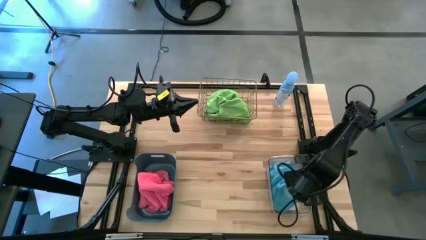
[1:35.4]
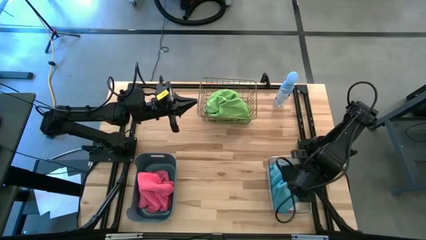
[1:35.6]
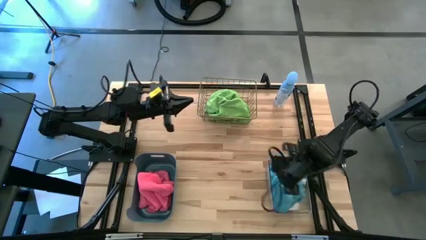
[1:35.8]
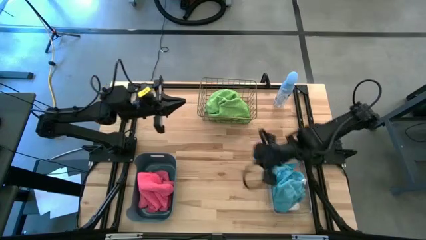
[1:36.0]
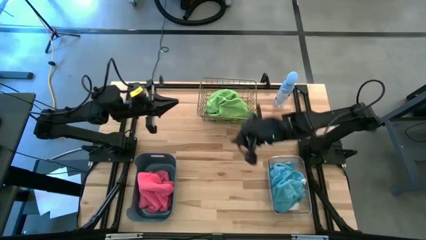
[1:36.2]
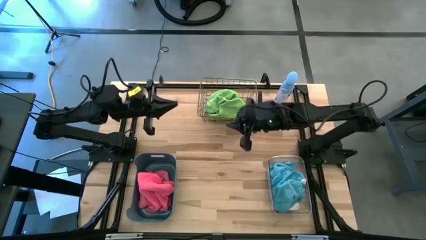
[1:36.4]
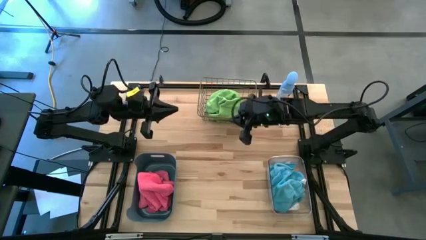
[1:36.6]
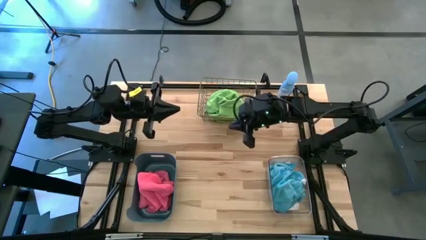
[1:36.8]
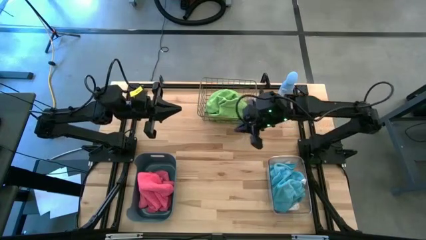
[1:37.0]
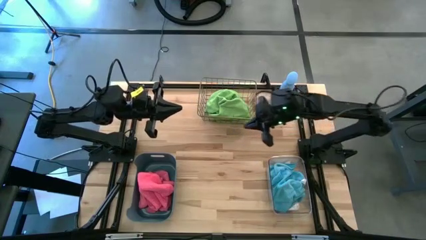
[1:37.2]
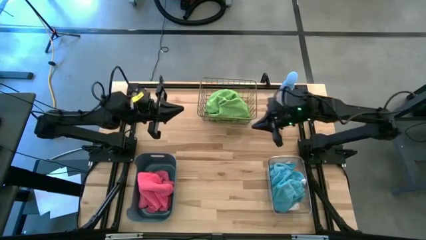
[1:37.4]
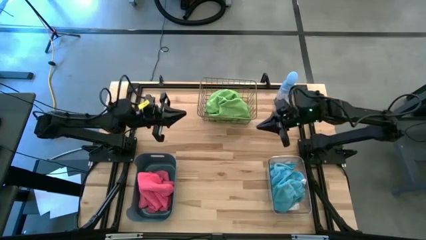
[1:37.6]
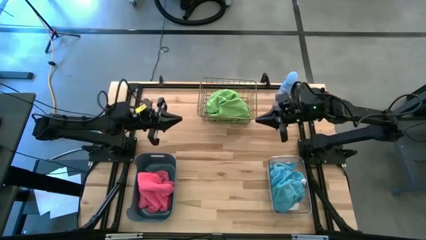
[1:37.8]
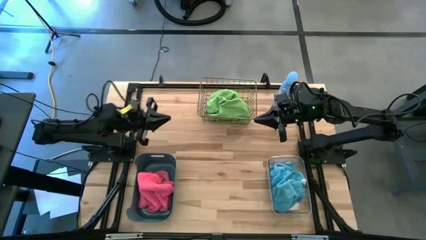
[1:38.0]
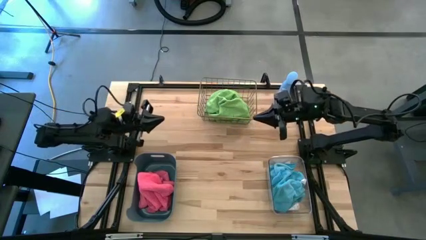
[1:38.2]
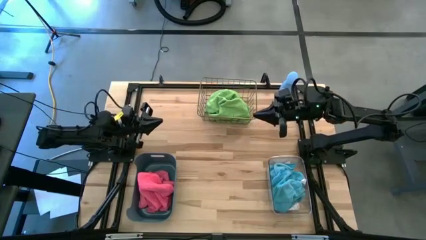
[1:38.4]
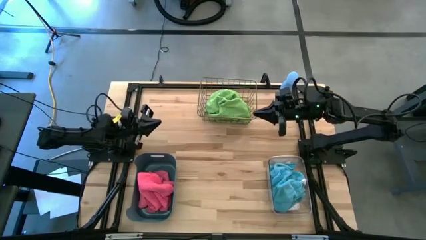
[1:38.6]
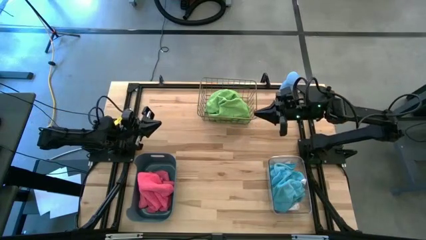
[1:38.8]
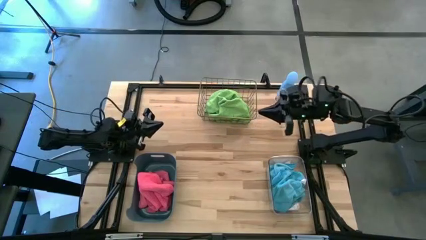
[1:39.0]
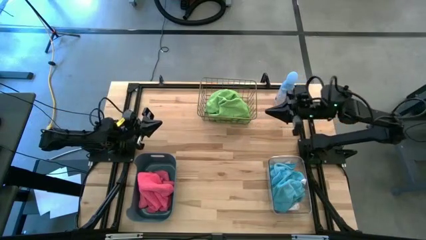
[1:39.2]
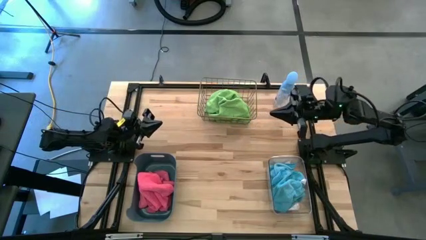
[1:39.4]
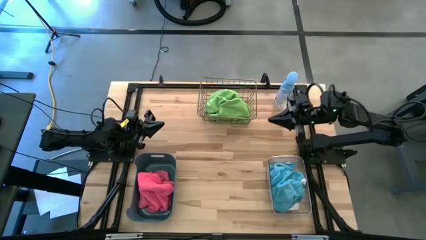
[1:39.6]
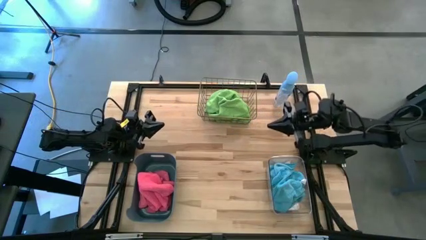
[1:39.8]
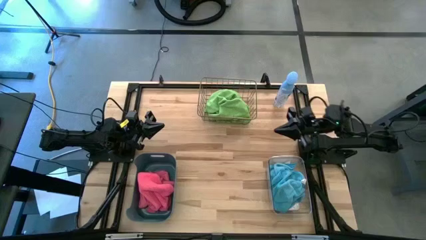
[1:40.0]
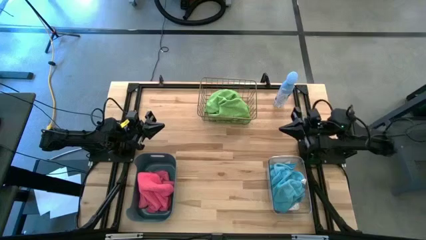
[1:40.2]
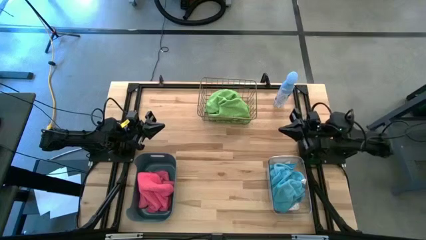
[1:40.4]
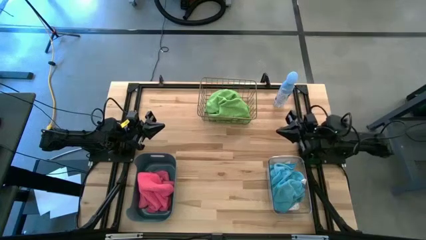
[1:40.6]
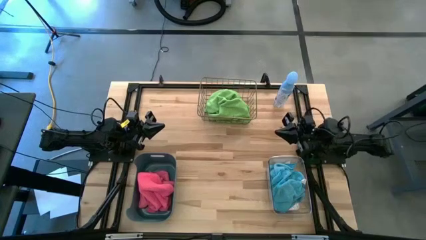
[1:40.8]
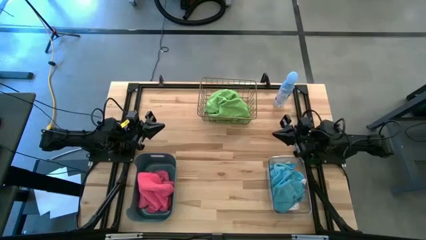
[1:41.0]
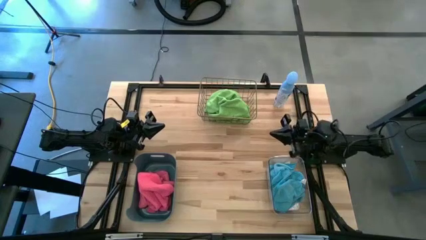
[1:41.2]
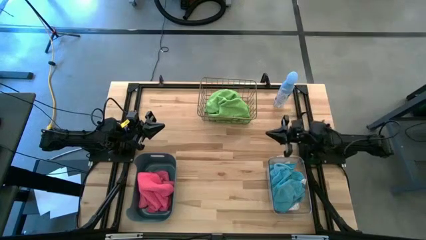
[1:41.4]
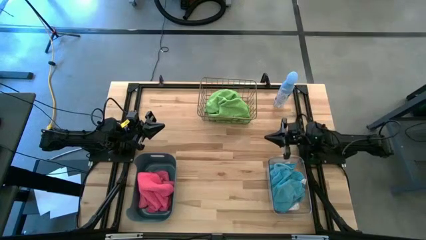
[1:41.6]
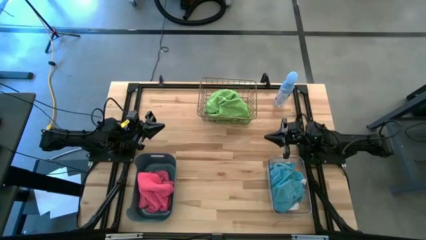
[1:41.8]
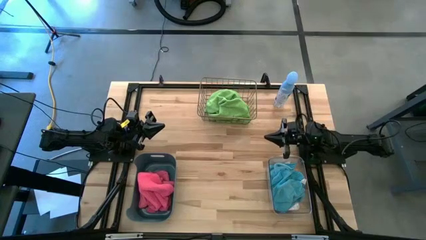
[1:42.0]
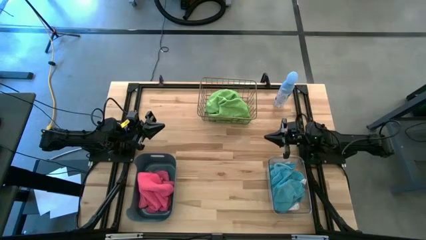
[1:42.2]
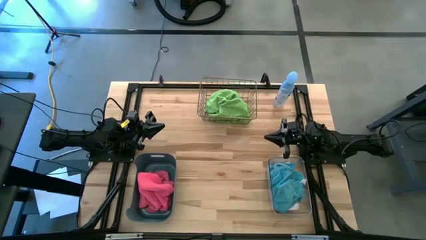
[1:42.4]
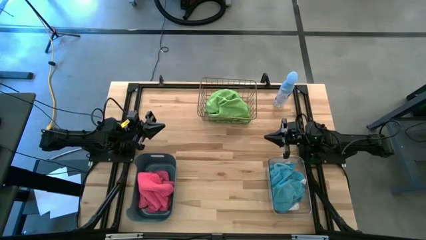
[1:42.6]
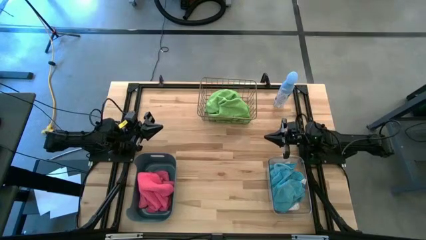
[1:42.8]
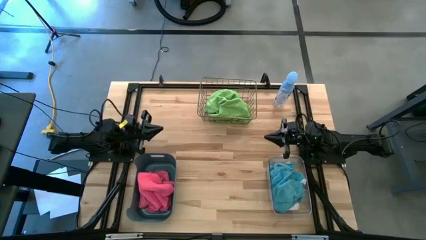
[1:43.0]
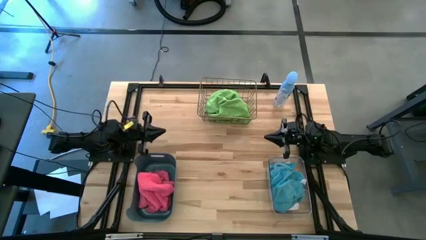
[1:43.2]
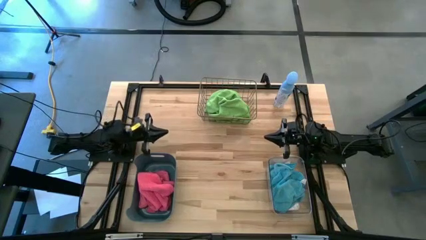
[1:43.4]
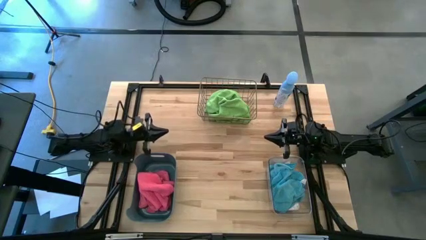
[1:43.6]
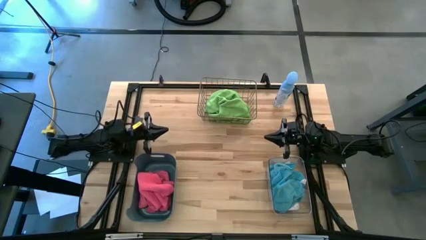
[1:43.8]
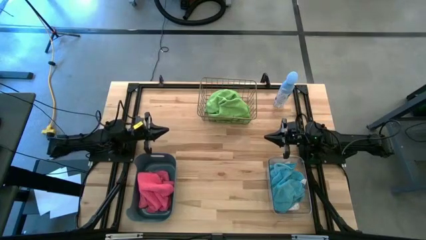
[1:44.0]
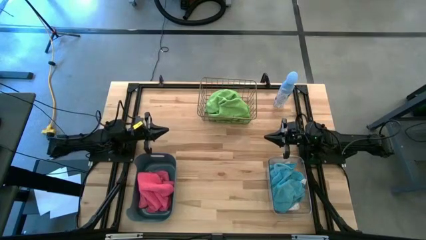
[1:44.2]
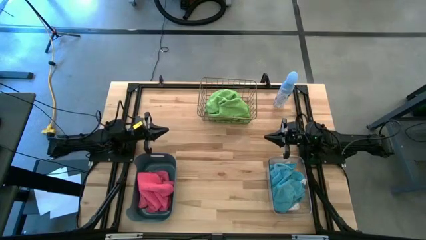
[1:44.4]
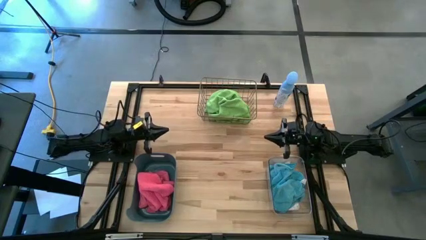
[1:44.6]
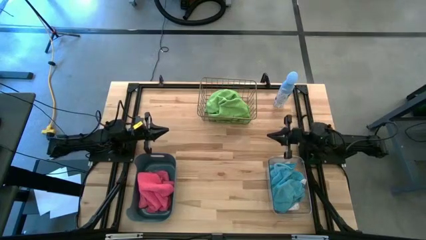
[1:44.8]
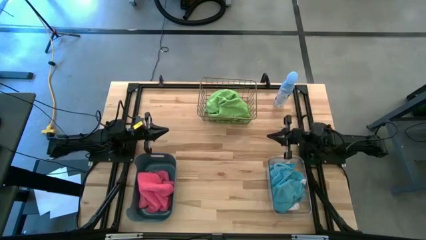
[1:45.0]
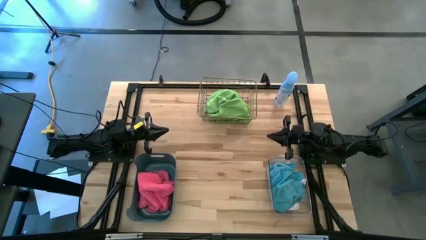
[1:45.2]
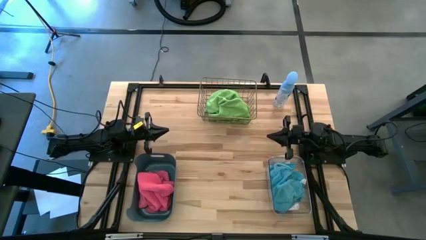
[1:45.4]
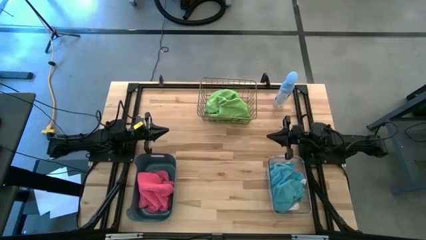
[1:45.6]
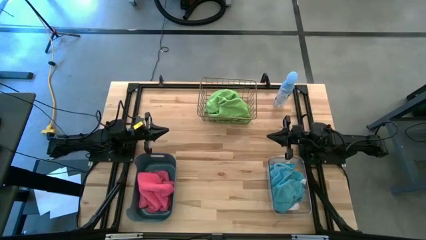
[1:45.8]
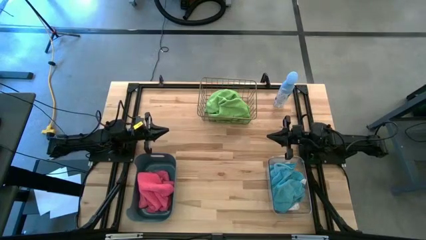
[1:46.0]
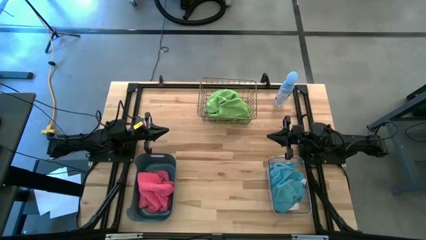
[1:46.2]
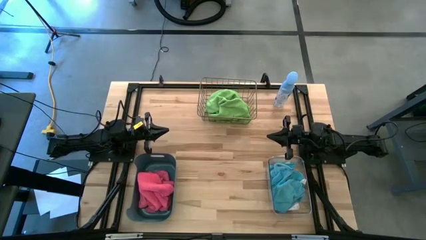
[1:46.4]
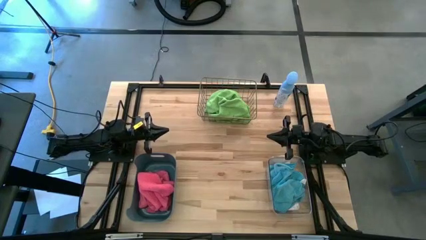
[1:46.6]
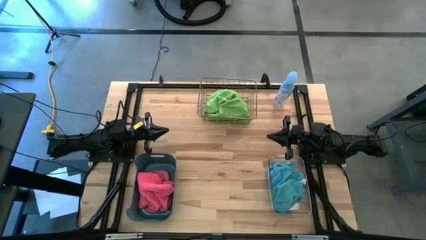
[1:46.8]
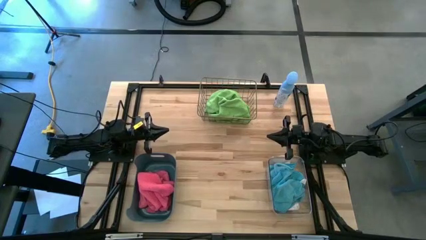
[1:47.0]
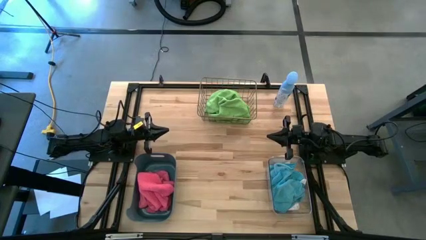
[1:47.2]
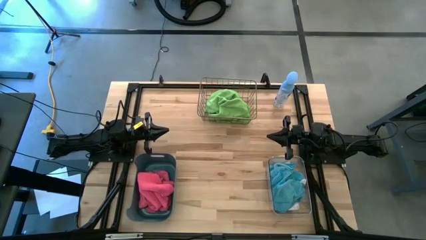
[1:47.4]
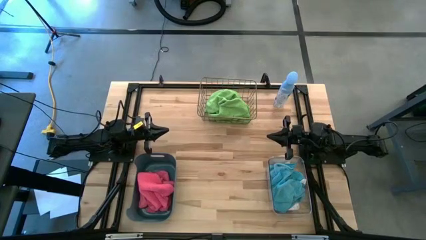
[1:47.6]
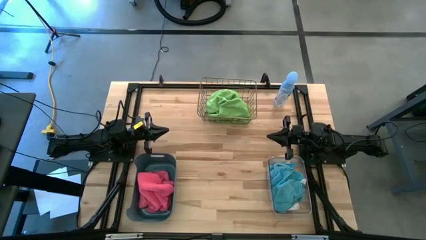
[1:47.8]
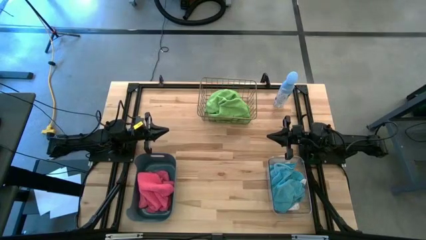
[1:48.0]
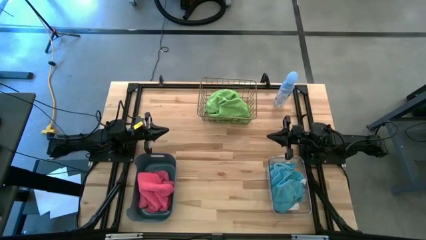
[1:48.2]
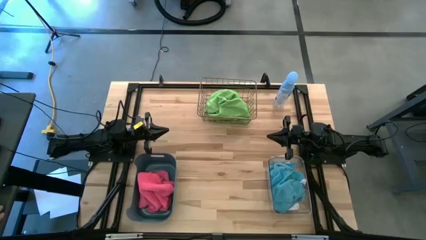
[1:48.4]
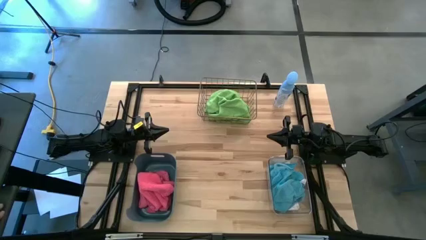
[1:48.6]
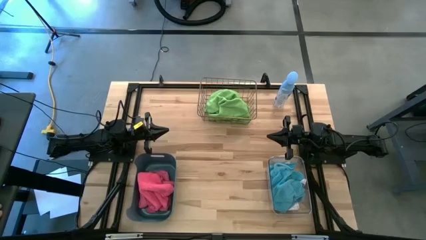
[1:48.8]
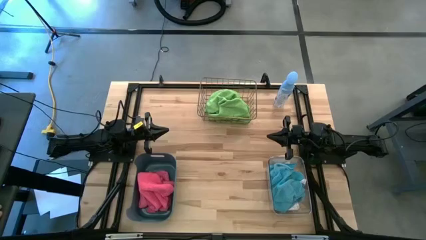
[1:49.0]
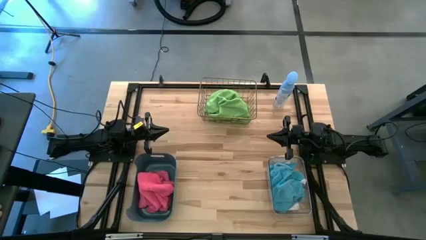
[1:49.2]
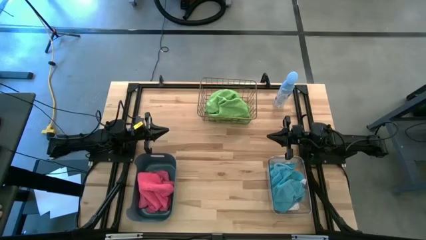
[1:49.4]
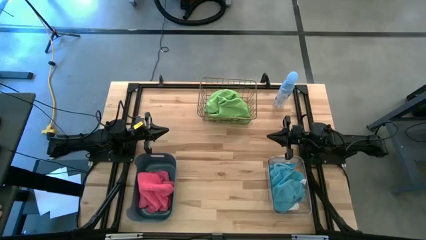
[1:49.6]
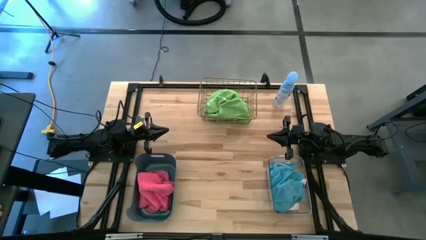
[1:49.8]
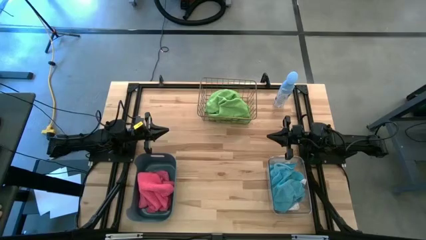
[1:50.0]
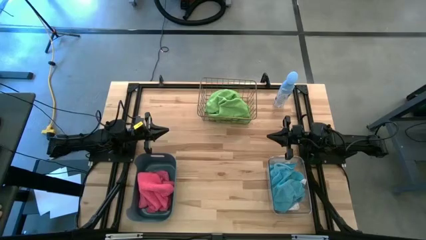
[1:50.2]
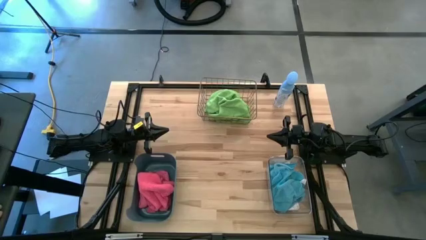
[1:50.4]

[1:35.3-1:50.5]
Task: Sort microfiber towel by color & place in baskets
Return to Home Position

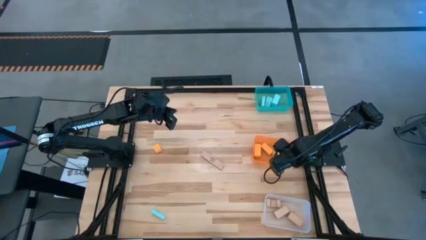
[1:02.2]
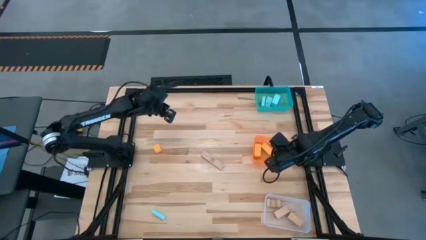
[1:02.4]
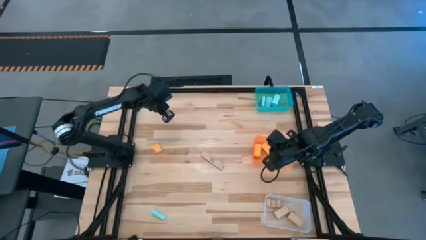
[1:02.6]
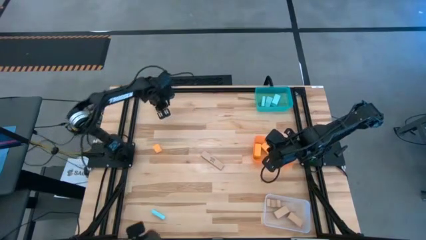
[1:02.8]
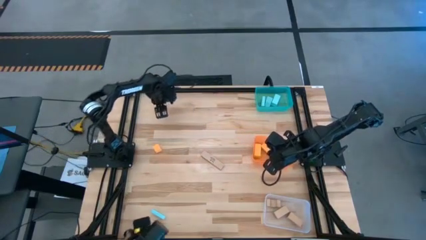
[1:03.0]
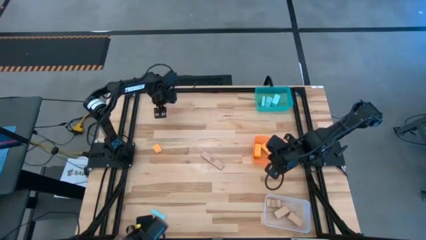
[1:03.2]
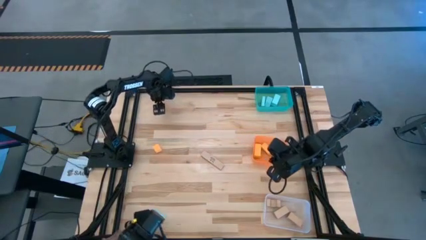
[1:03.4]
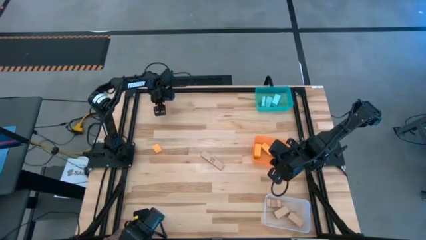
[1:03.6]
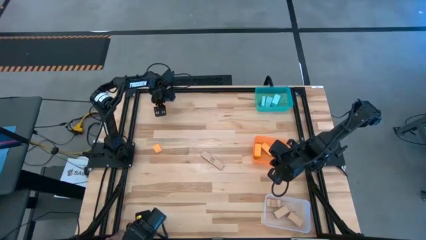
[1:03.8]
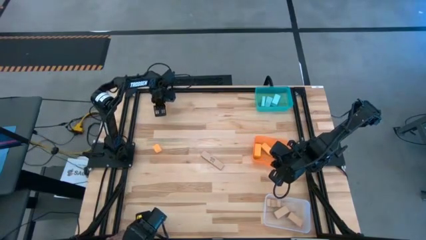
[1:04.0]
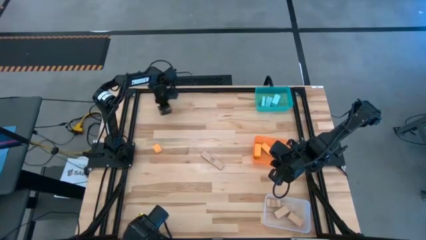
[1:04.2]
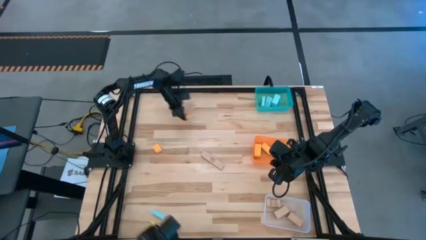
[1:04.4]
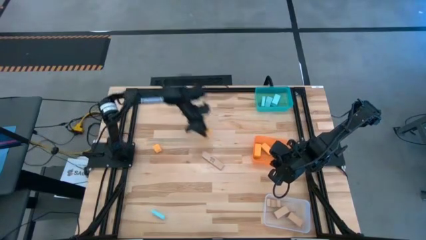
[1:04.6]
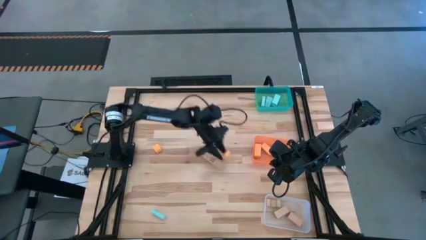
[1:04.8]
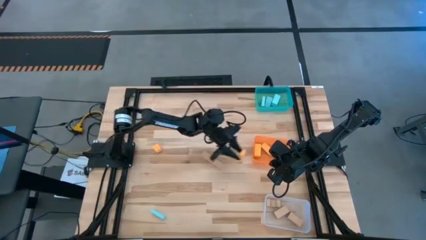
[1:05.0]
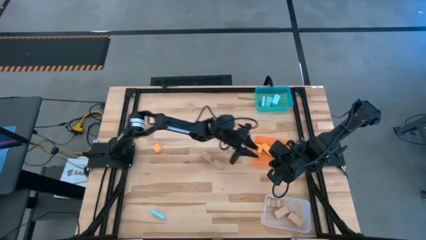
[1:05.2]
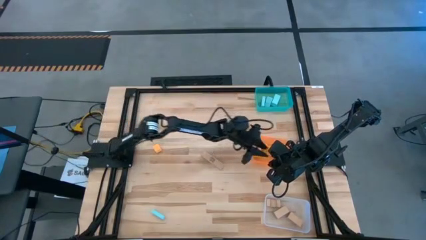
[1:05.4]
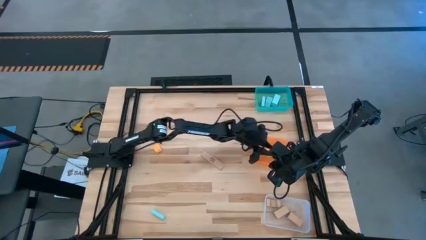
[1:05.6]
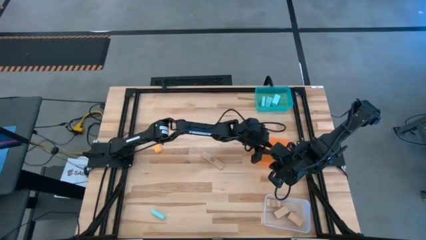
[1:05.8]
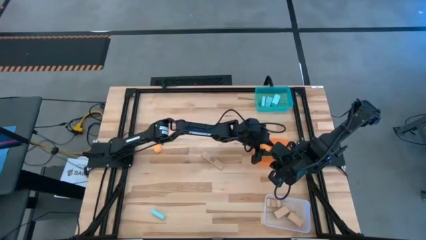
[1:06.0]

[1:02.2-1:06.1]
Task: Sort & place blocks by color
Put the orange block into the orange bin
